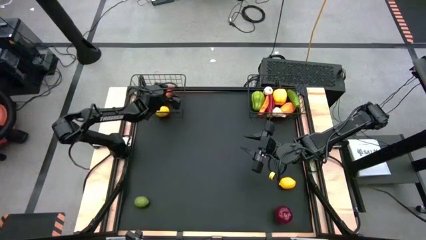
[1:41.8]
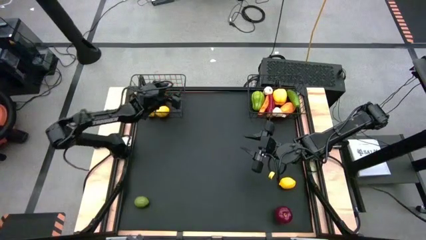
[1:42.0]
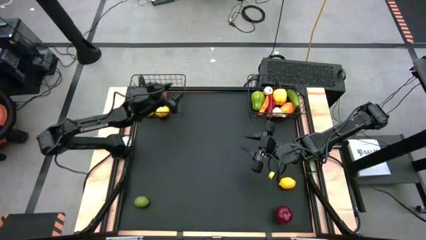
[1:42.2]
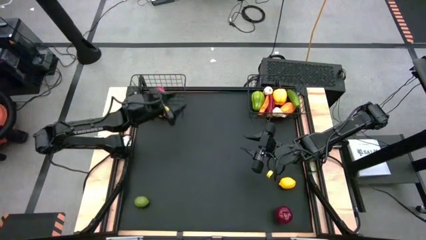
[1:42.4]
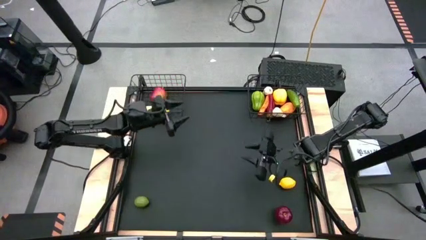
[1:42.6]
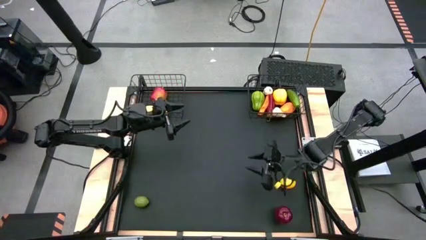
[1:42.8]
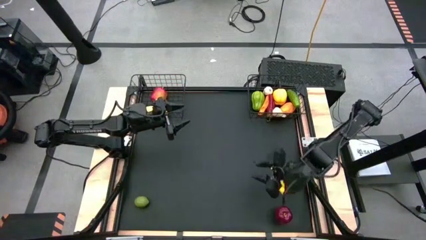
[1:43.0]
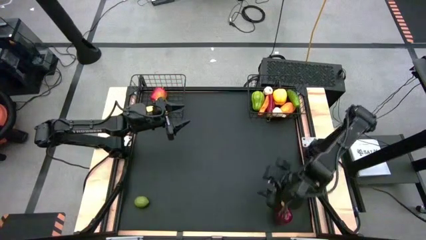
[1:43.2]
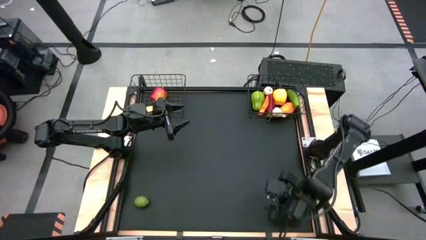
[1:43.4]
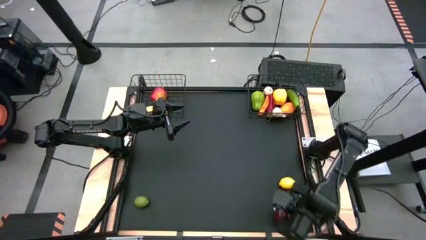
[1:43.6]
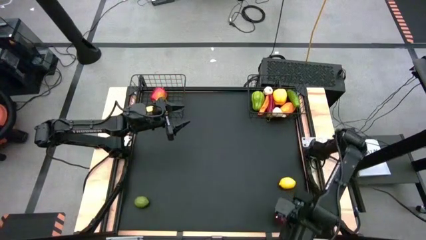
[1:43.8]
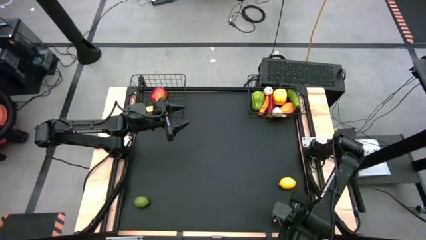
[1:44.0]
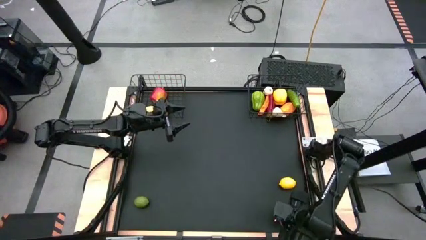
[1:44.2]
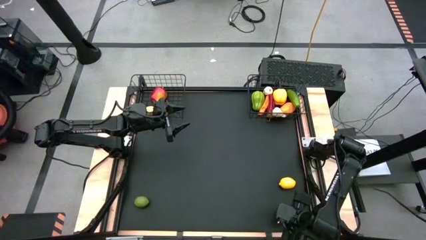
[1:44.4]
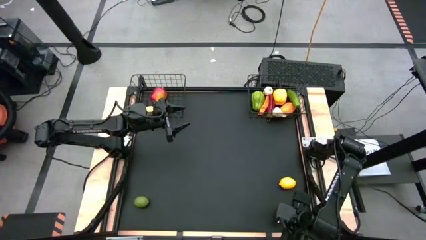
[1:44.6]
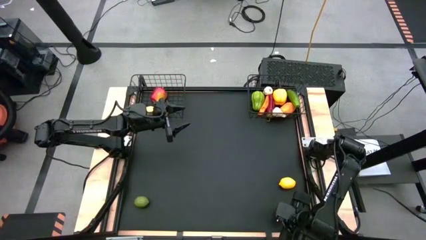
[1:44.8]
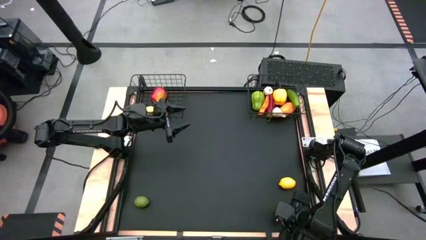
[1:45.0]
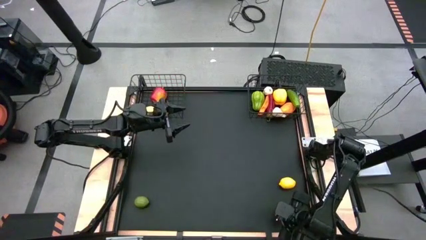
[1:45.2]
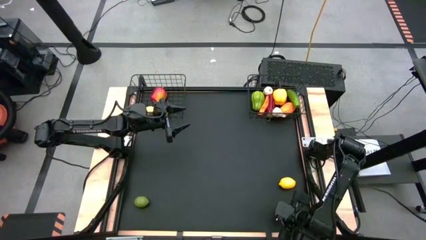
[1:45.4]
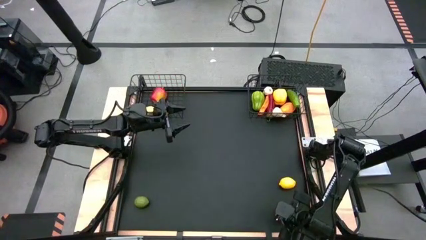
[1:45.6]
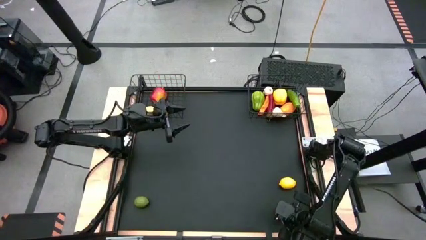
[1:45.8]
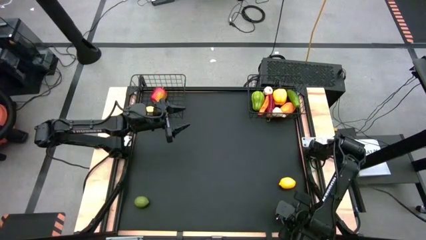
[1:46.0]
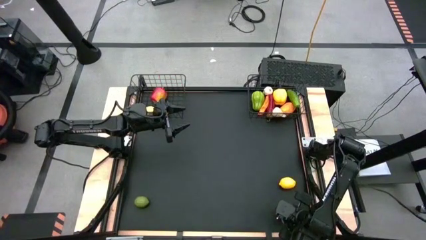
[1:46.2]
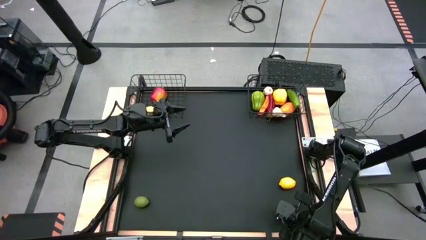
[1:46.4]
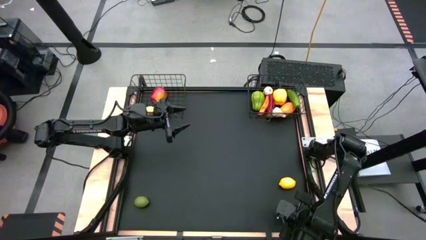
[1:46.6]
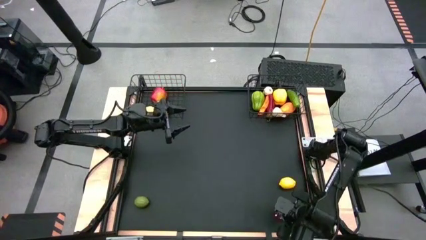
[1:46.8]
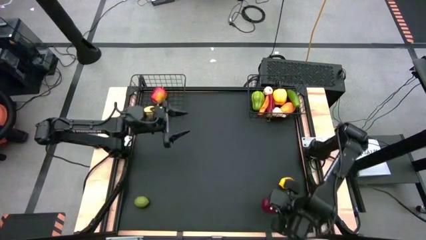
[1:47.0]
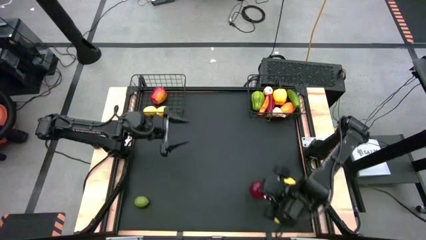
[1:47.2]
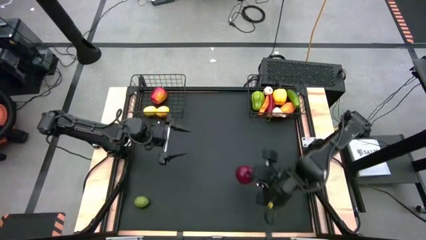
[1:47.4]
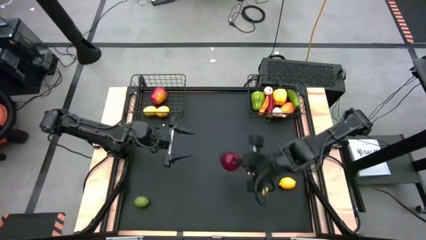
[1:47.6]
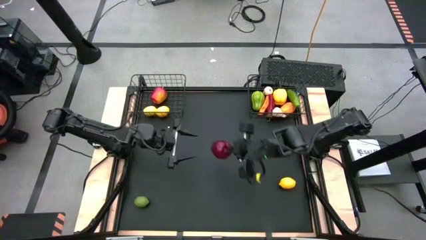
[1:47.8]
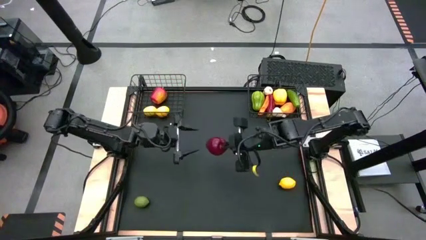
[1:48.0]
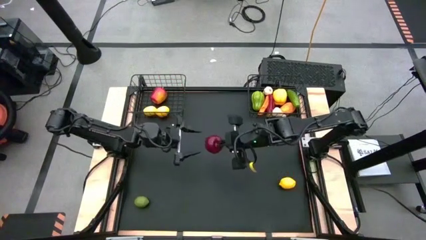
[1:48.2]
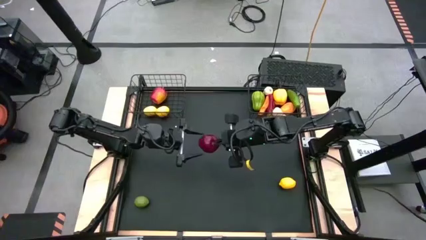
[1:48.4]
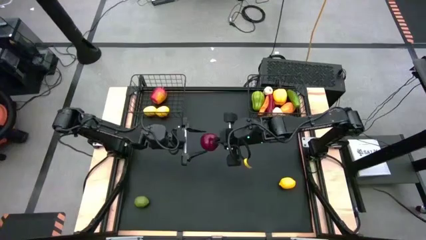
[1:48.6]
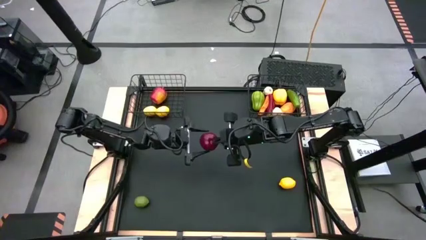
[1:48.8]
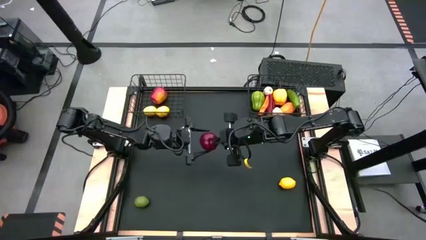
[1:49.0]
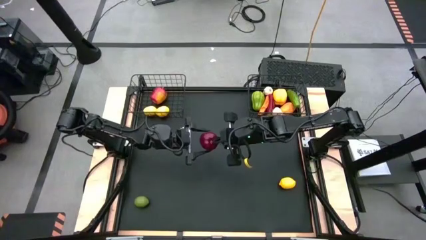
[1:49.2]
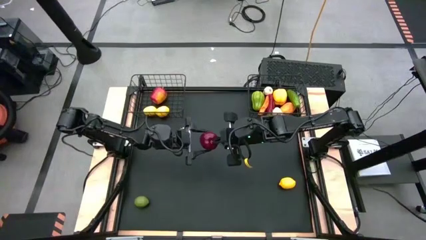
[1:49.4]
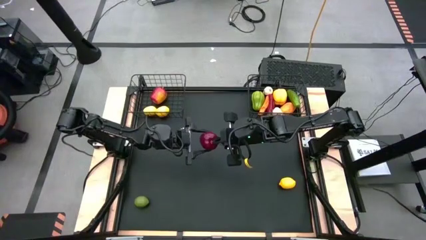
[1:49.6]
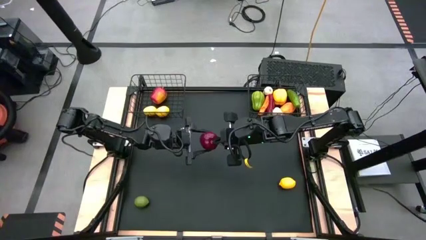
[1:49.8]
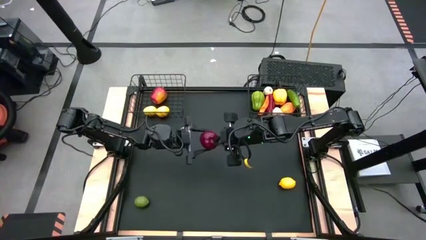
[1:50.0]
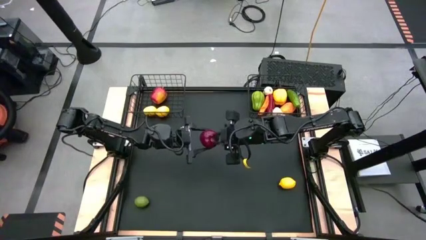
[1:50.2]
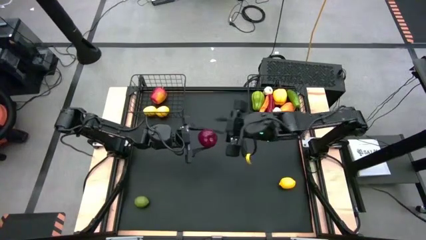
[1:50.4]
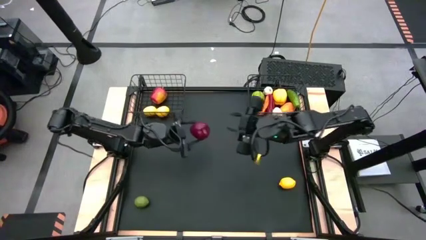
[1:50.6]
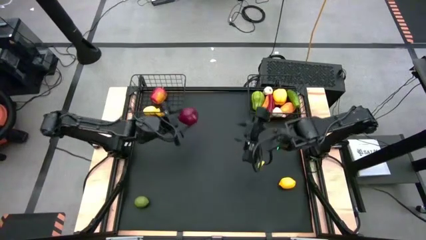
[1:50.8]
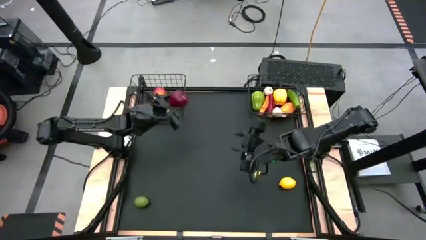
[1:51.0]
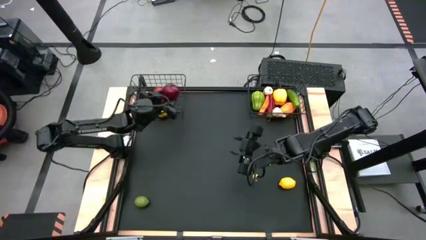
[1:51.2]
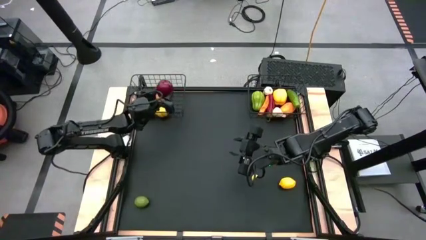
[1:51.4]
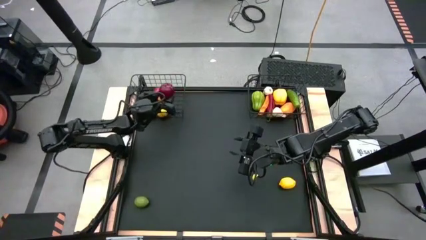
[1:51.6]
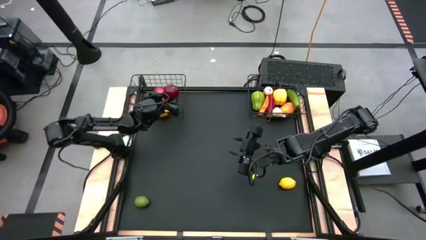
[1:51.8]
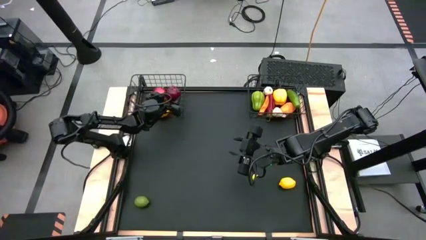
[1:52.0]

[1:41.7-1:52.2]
Task: Sort produce into baskets
Put the red apple into the left black wire basket

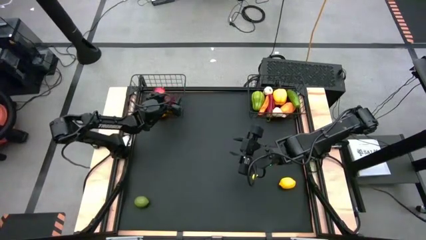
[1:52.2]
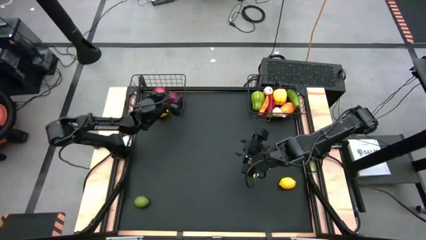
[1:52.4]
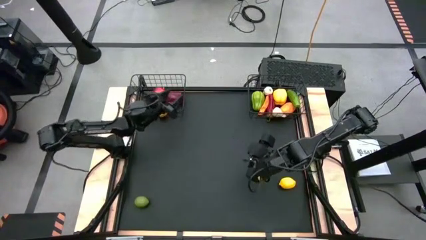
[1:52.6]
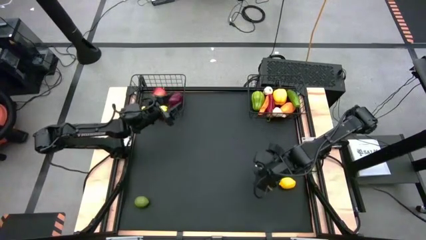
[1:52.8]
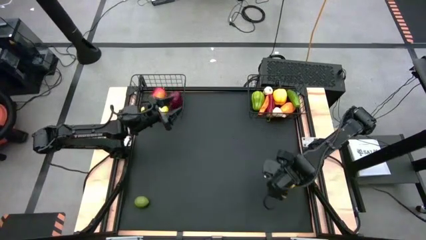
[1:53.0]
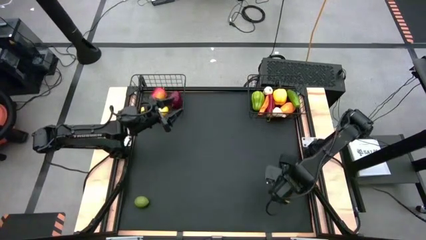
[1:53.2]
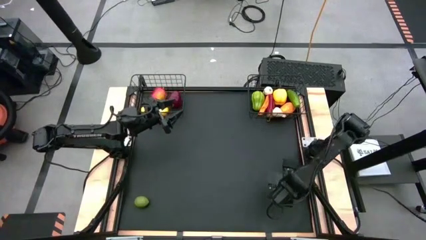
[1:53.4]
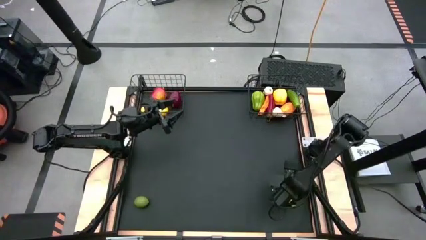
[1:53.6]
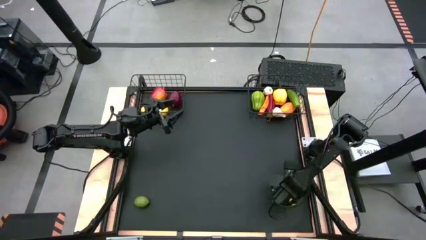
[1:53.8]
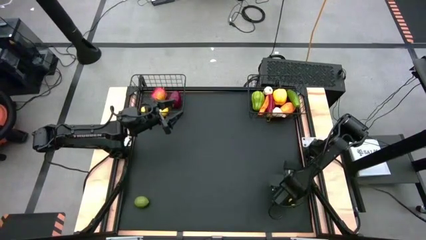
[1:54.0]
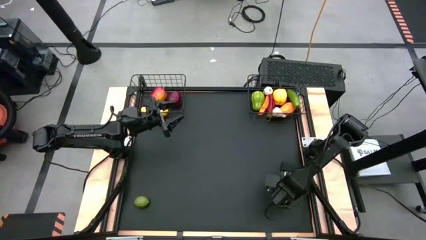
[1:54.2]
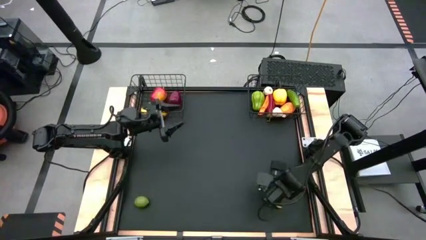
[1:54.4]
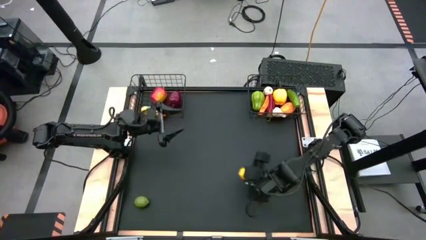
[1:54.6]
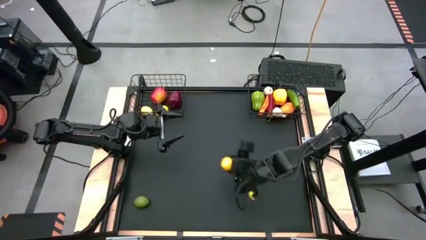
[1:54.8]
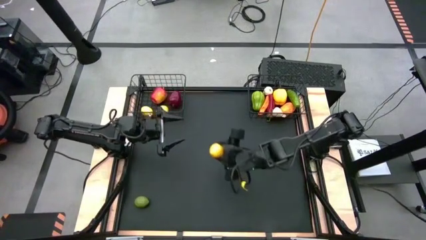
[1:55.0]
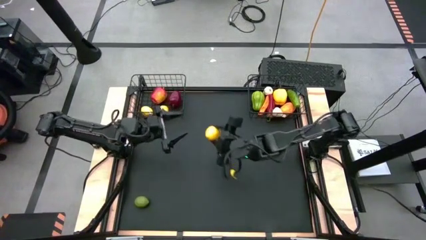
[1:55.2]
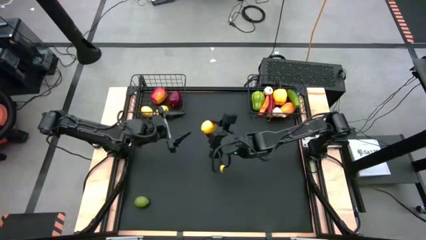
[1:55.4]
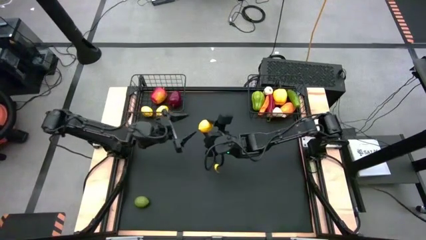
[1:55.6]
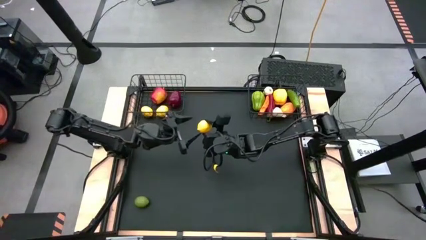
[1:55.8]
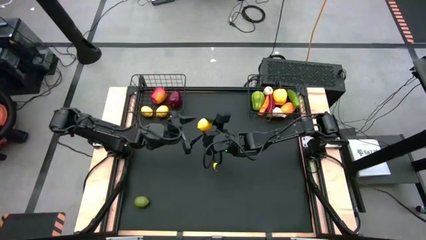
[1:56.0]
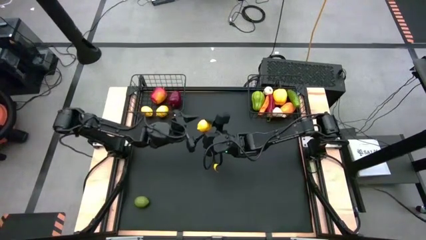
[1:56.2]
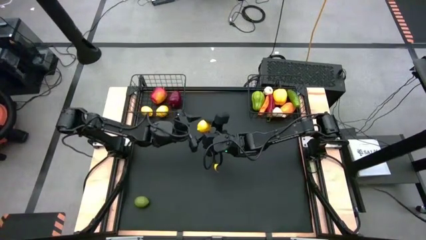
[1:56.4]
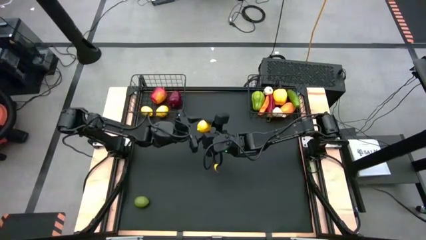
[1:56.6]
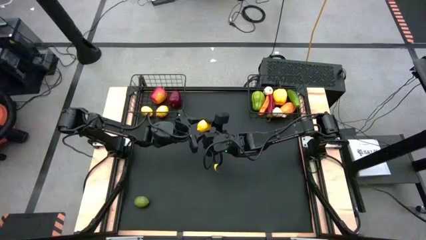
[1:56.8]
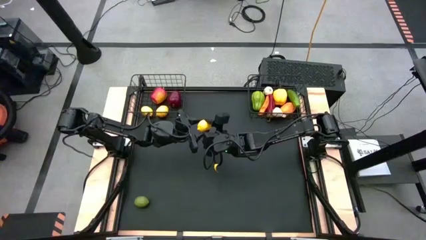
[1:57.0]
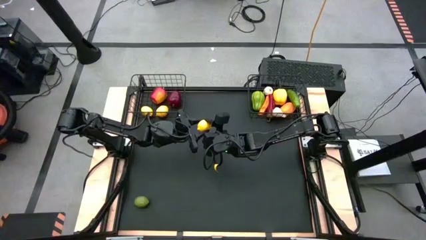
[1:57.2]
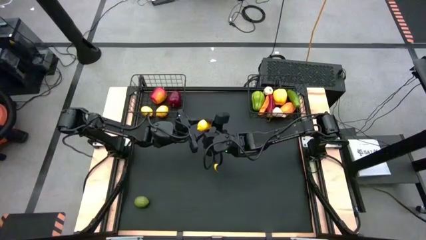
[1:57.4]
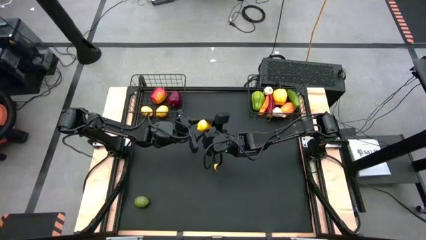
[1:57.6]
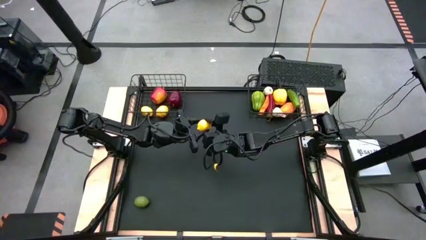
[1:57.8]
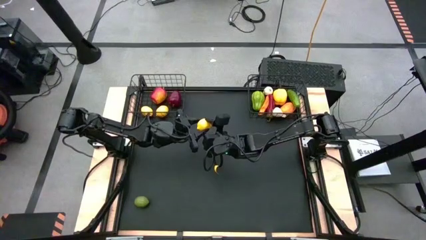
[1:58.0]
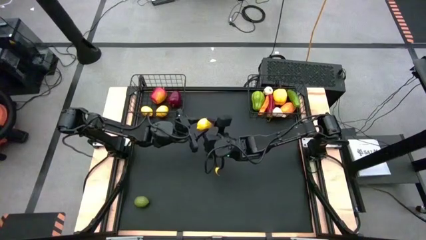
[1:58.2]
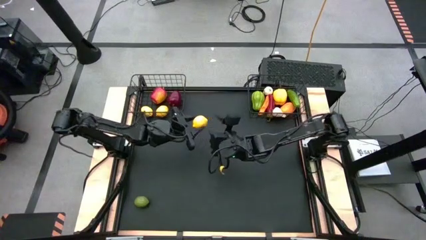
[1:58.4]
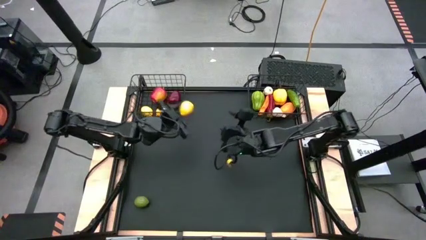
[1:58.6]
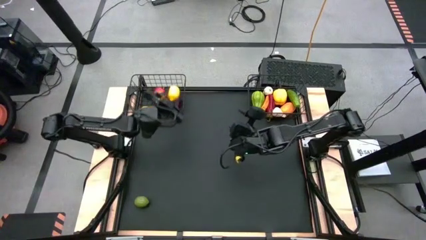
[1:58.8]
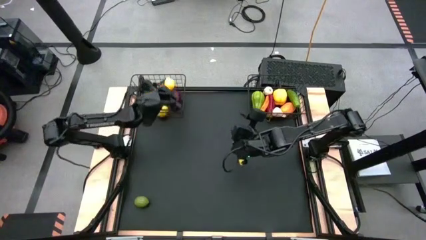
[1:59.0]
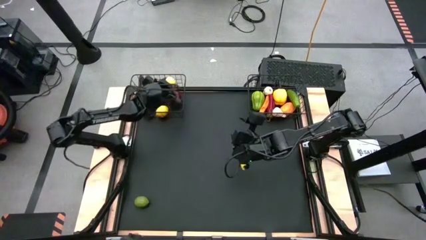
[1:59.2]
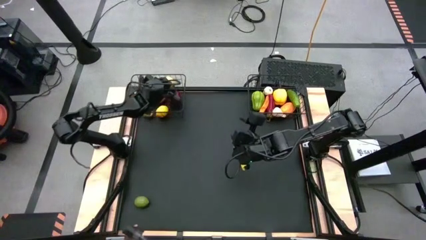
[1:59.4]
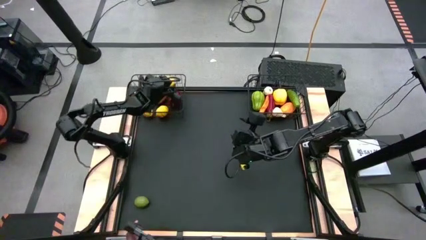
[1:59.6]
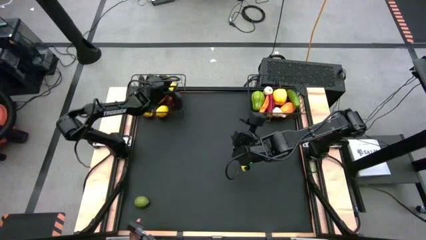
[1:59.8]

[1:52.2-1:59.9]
Put the yellow lemon into the left black wire basket
